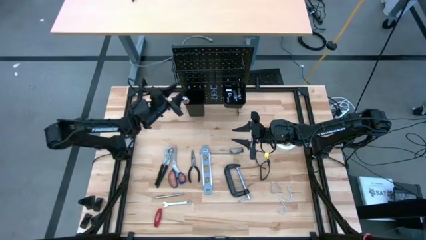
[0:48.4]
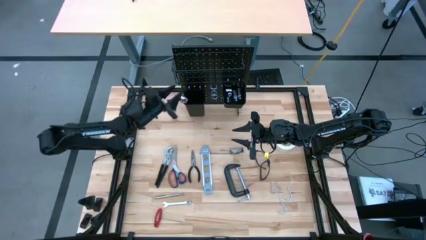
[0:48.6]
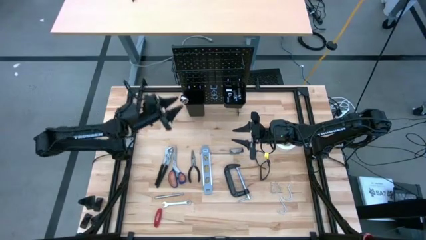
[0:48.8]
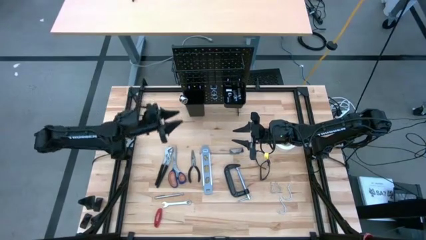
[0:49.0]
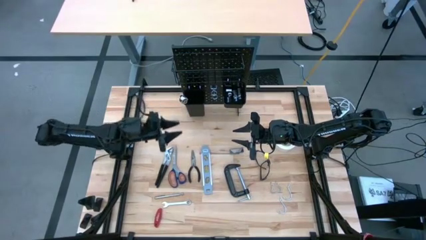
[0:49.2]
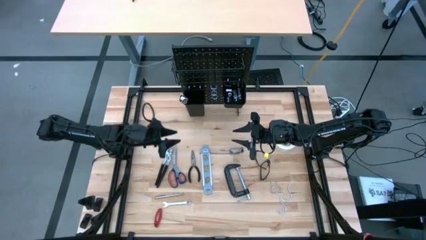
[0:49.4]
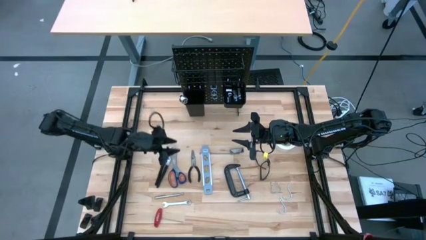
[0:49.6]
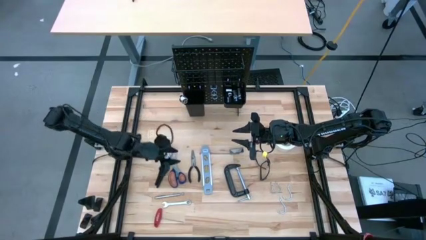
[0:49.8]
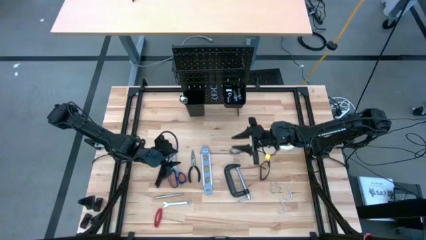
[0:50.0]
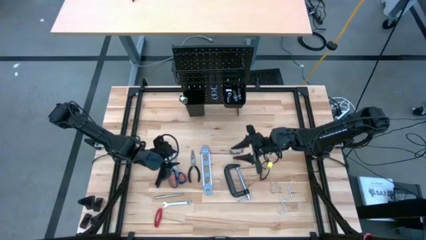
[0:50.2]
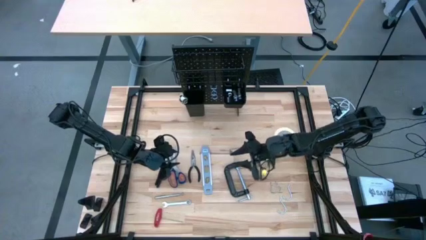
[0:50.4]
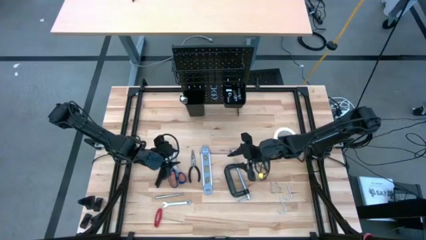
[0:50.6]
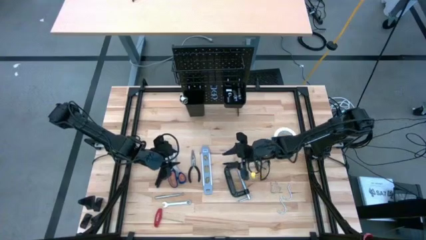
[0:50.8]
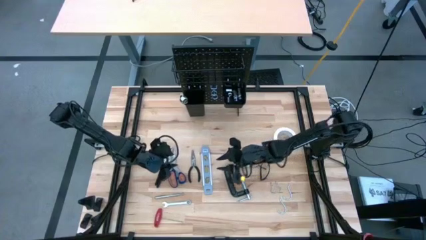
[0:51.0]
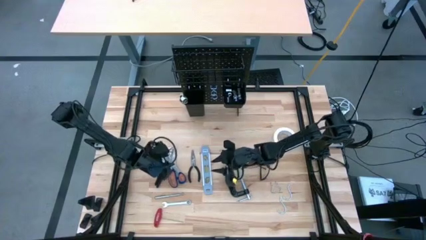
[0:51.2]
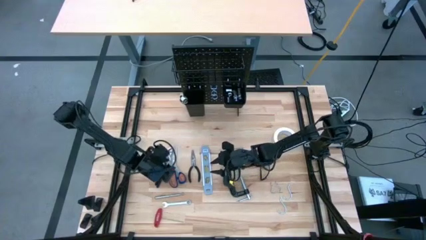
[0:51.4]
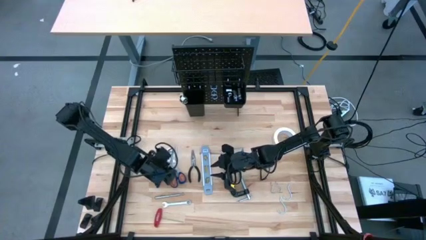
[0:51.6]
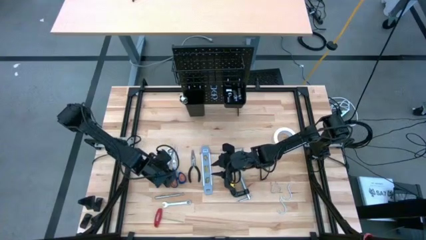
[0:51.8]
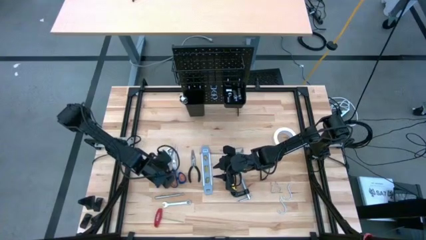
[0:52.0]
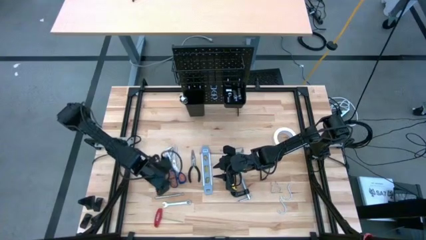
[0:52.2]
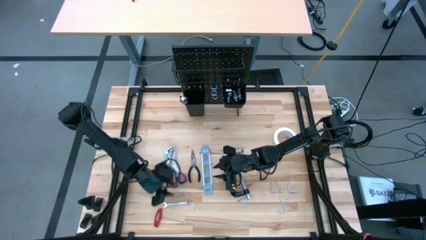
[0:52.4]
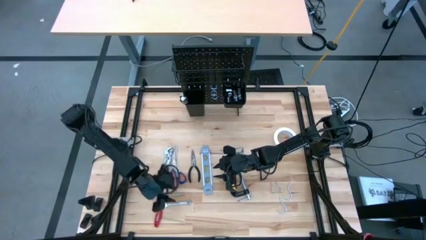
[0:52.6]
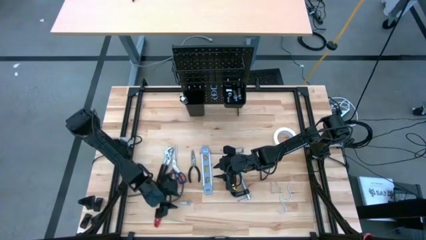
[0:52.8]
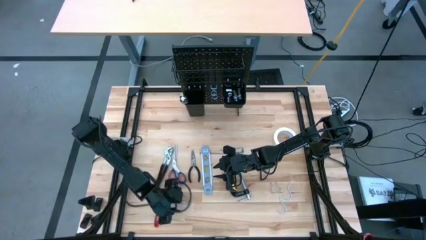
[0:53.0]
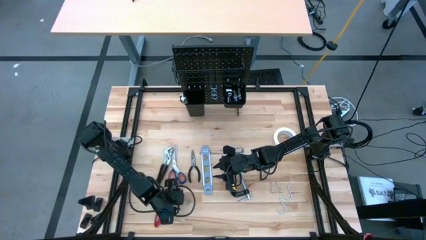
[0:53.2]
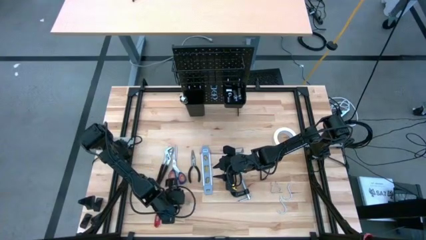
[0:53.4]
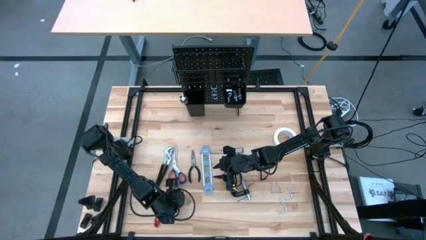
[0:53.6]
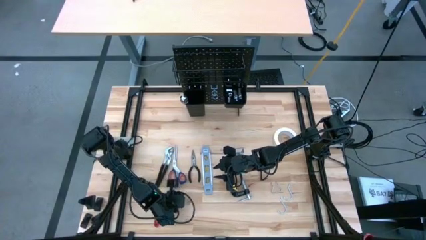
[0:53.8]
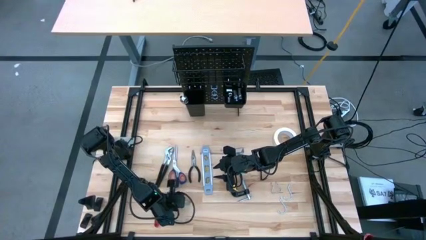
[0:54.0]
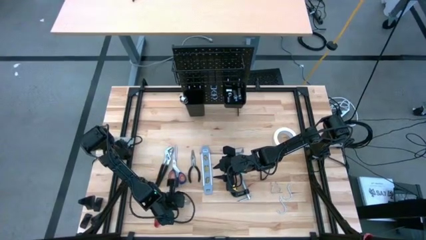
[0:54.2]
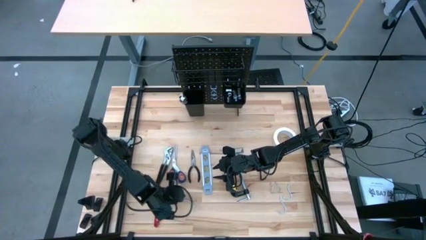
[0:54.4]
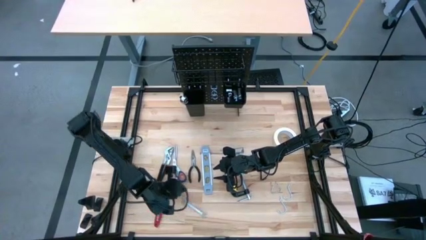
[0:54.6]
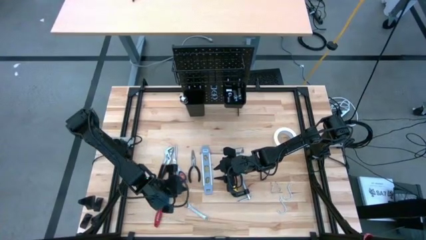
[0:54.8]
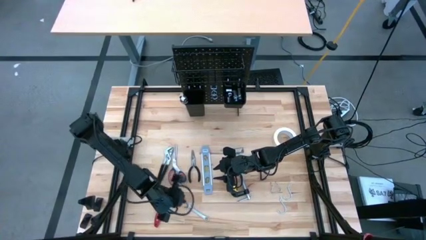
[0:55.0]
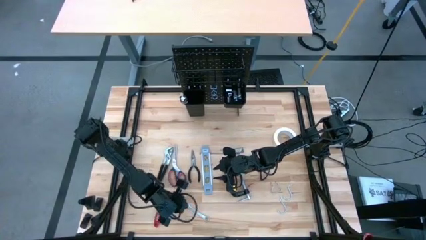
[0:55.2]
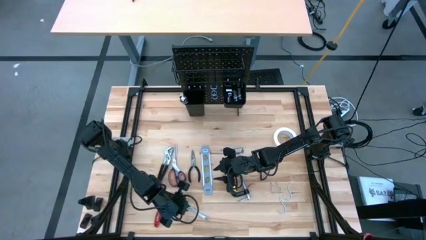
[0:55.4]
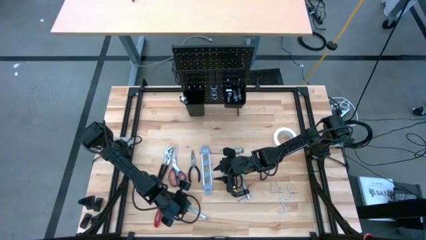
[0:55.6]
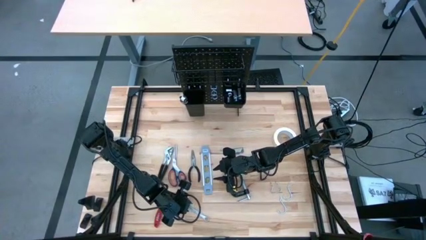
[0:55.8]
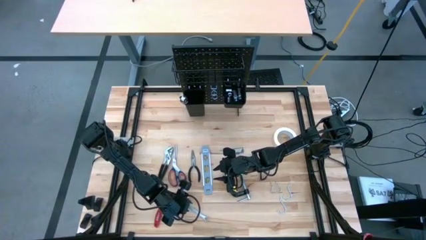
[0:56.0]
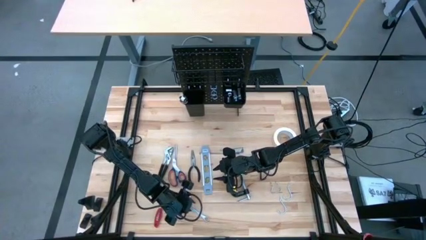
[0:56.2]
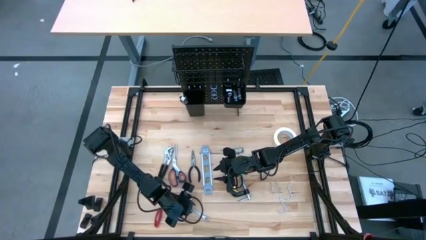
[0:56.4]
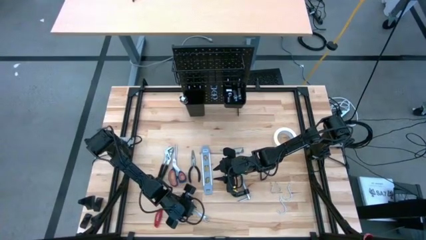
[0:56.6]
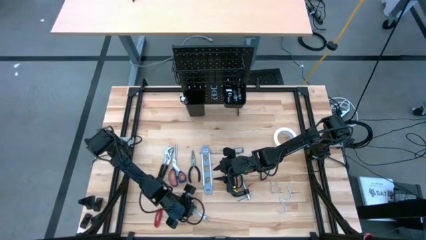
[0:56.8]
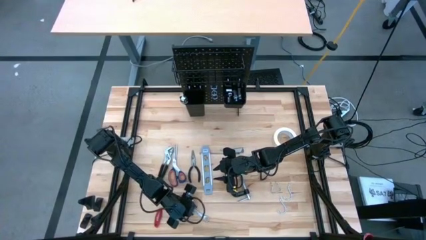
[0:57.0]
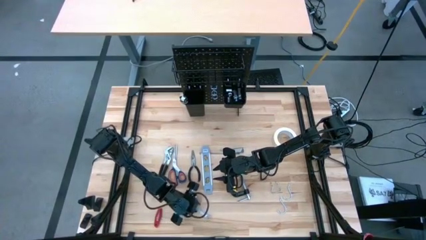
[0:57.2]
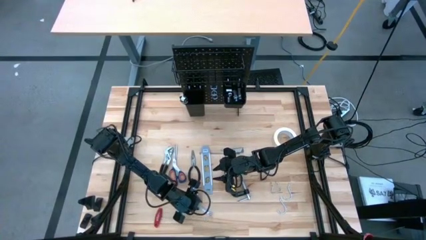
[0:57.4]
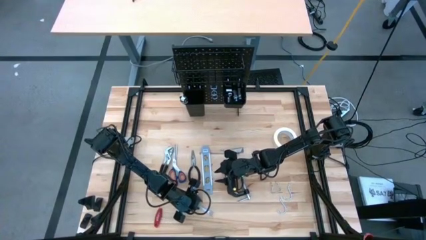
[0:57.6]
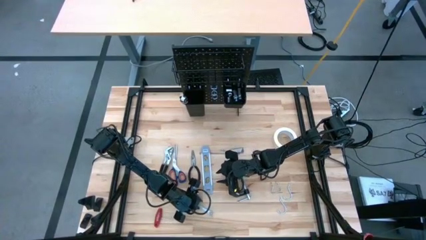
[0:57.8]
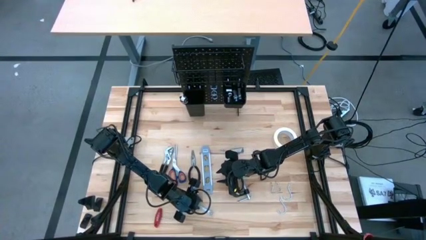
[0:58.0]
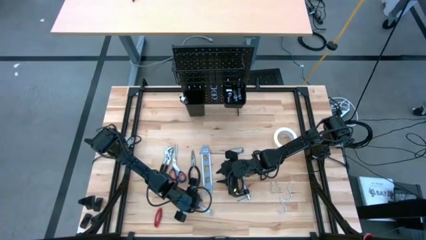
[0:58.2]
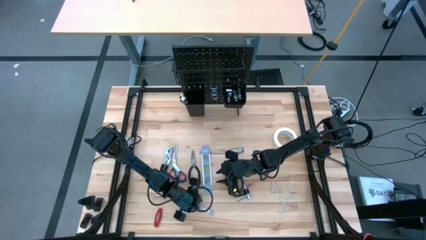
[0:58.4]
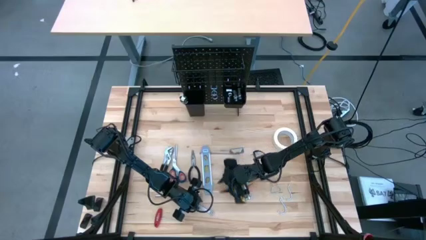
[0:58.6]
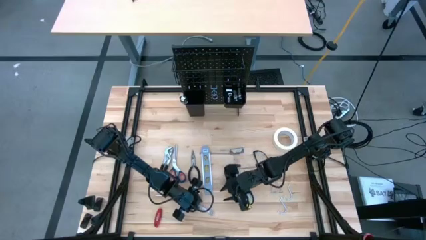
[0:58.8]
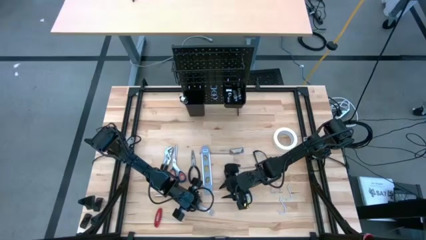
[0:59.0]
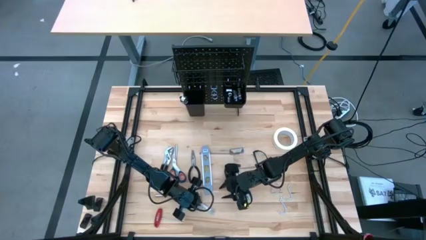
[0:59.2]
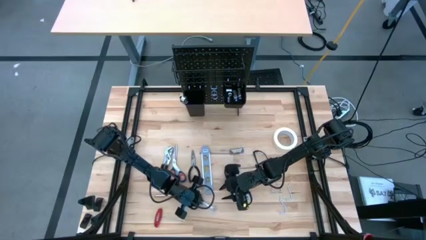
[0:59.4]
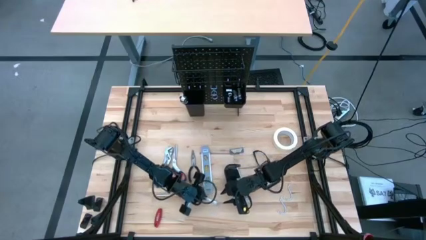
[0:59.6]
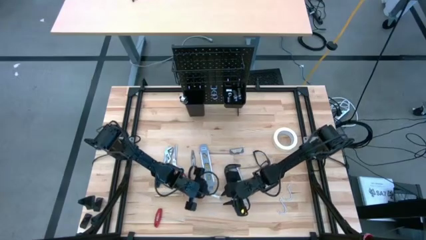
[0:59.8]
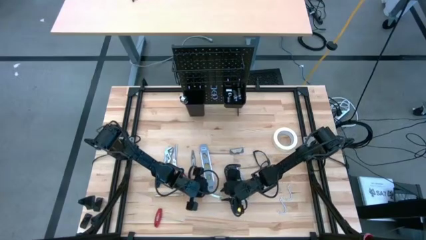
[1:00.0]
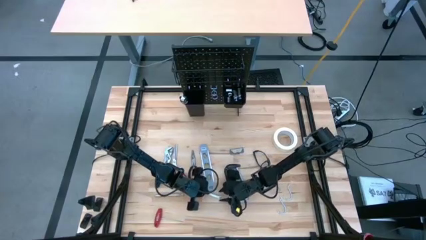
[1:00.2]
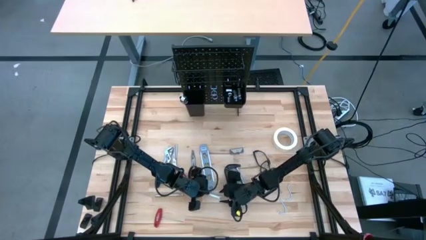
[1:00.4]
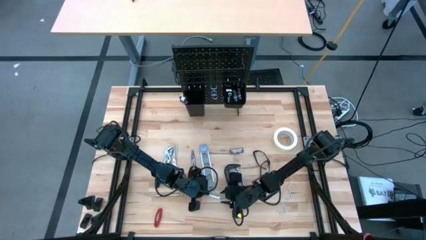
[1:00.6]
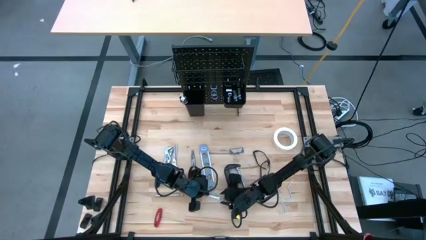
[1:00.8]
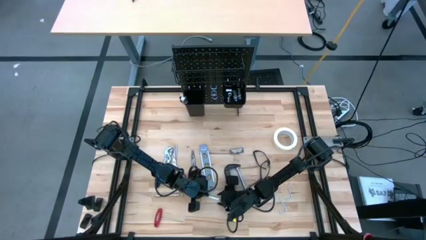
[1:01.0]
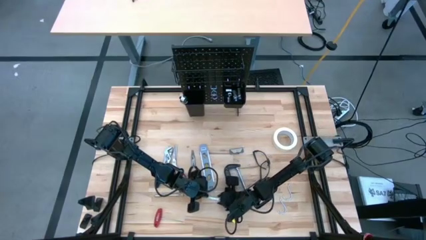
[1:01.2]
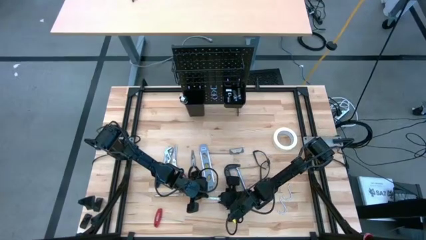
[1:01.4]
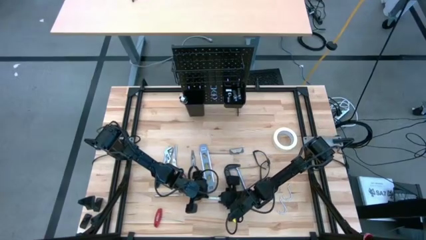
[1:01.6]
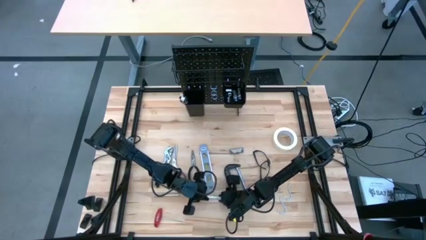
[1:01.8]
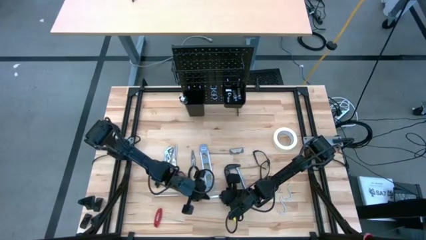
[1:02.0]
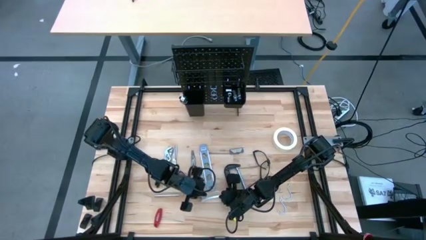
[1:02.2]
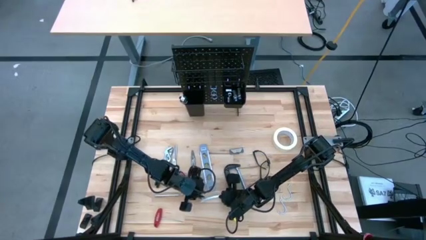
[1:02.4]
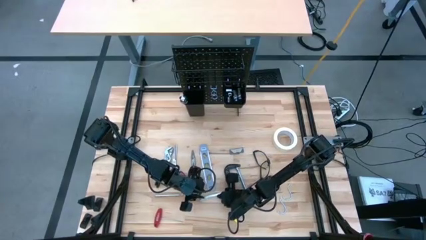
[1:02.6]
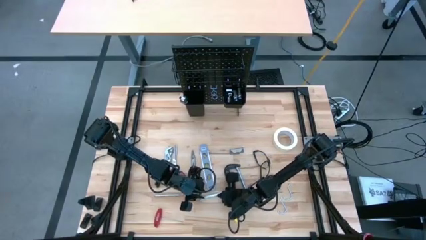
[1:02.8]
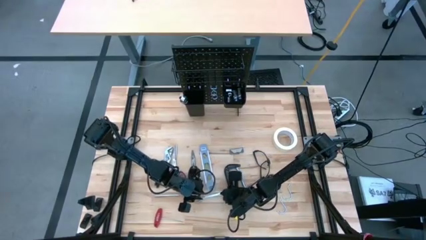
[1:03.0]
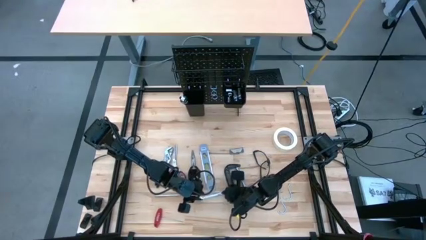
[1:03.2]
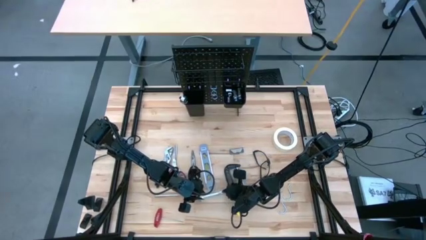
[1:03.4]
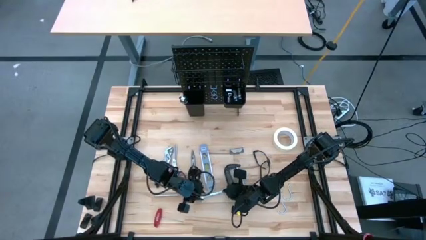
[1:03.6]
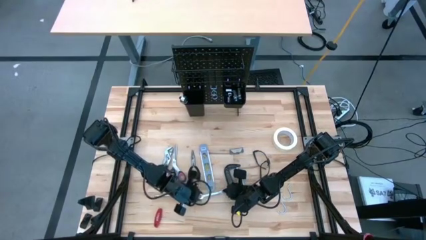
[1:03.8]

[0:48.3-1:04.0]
Task: Hang tools onto peg board
Put the wrench into the left black bin on the peg board
